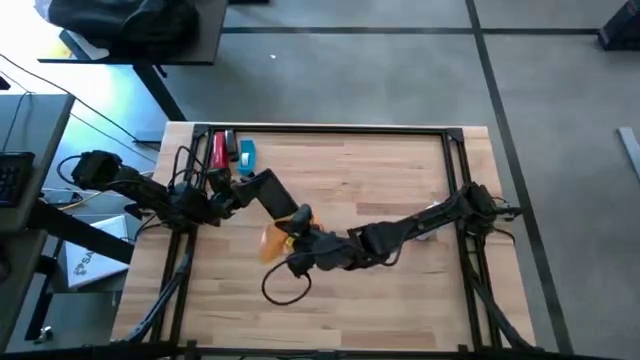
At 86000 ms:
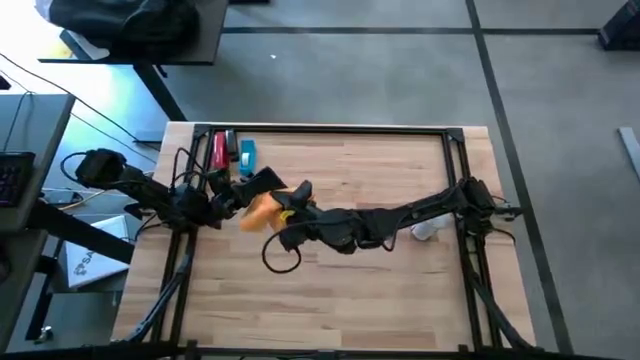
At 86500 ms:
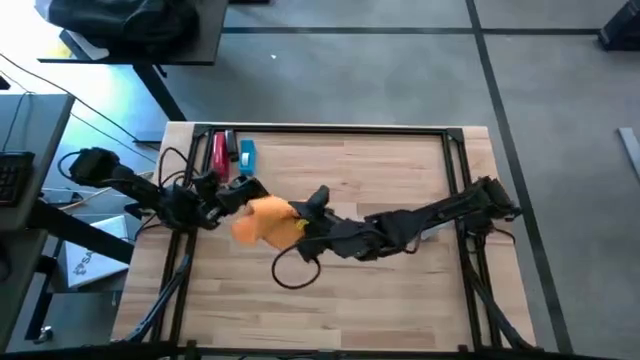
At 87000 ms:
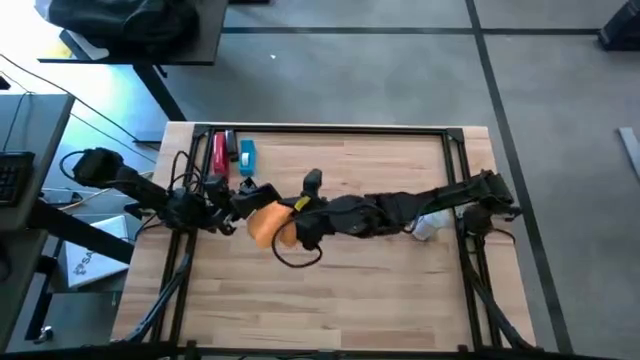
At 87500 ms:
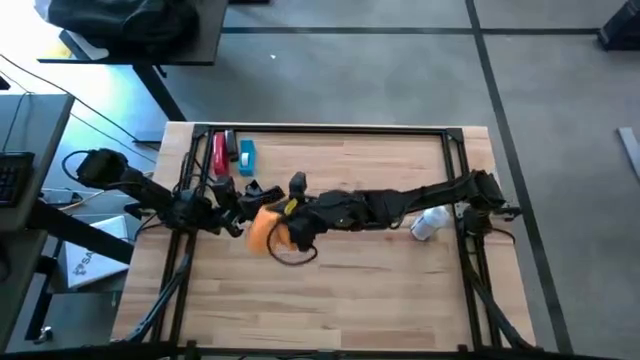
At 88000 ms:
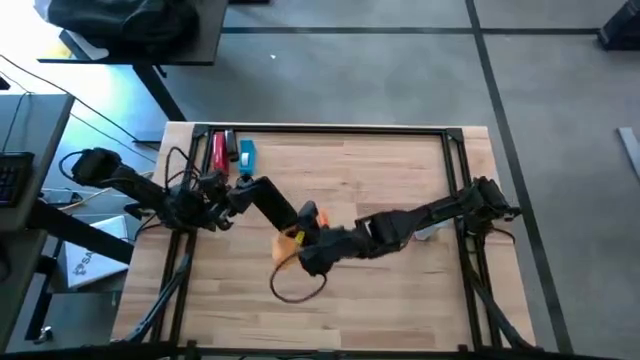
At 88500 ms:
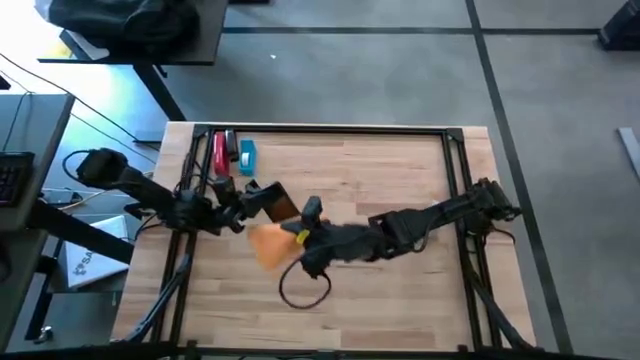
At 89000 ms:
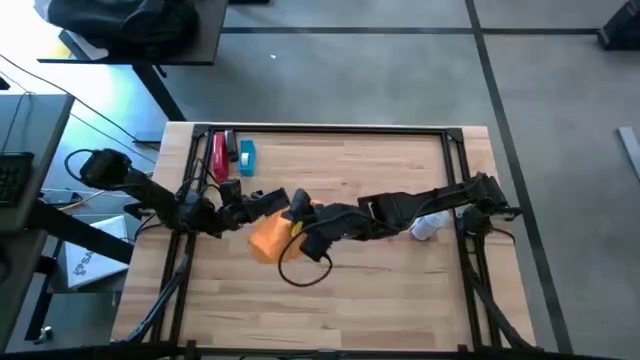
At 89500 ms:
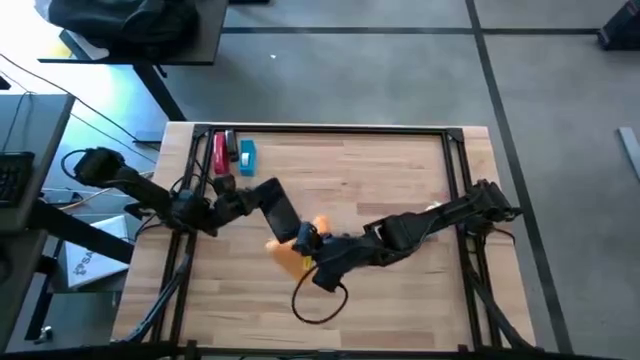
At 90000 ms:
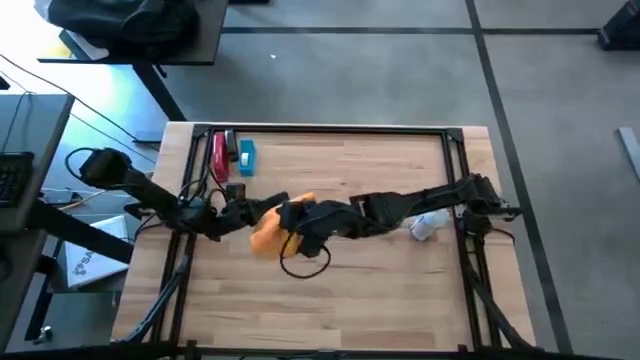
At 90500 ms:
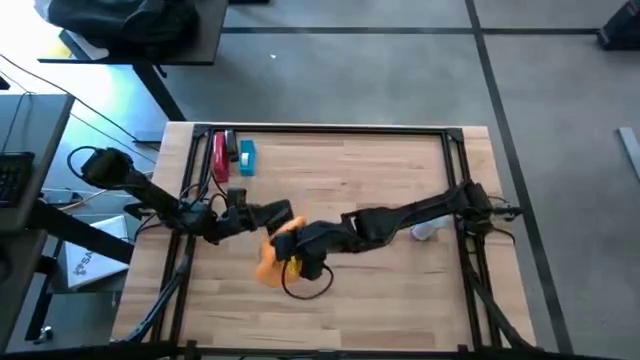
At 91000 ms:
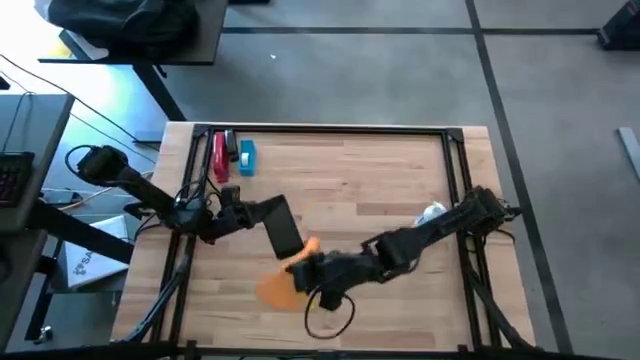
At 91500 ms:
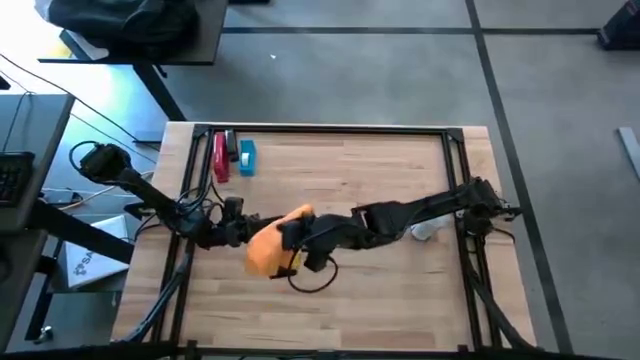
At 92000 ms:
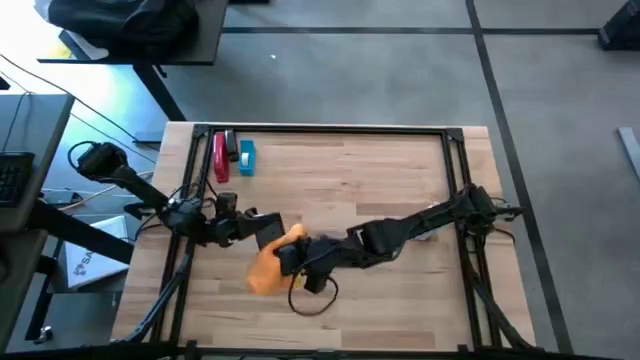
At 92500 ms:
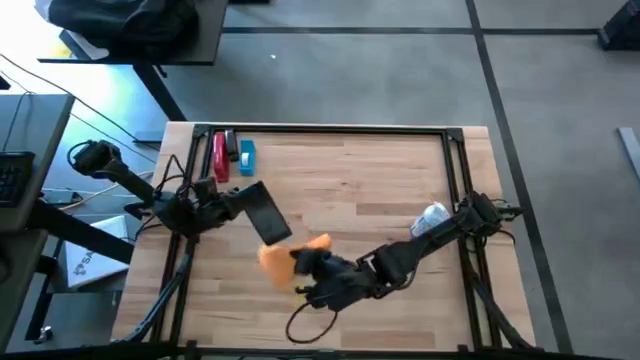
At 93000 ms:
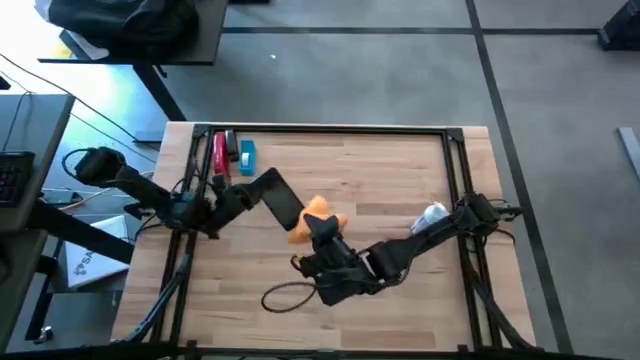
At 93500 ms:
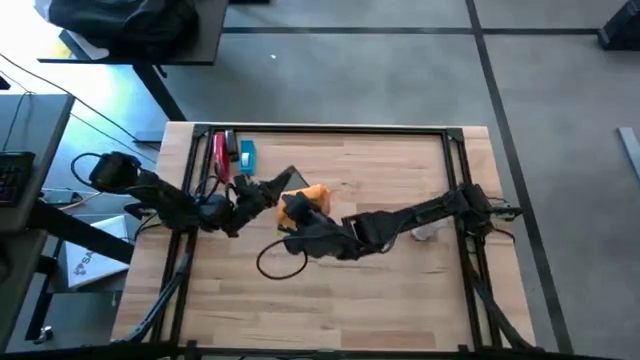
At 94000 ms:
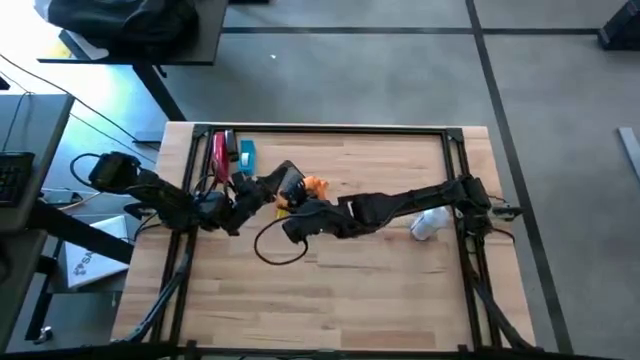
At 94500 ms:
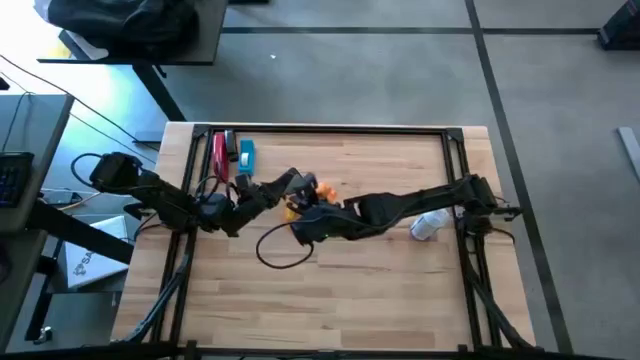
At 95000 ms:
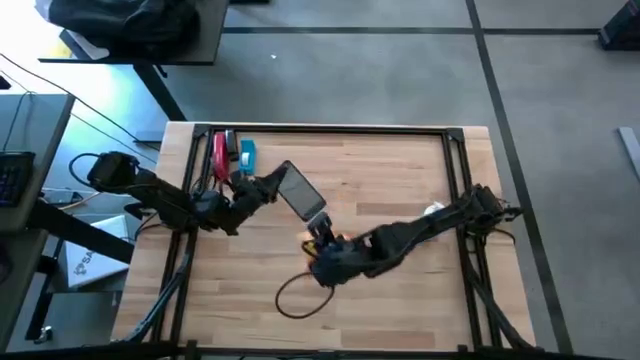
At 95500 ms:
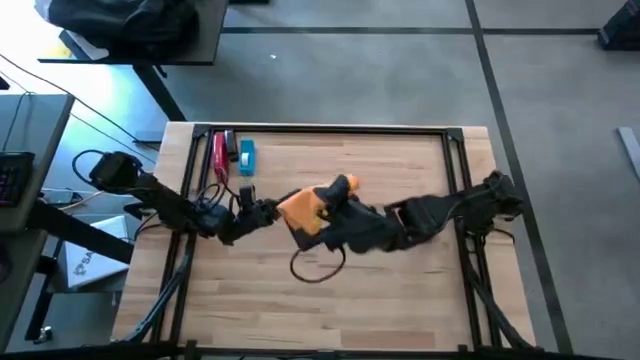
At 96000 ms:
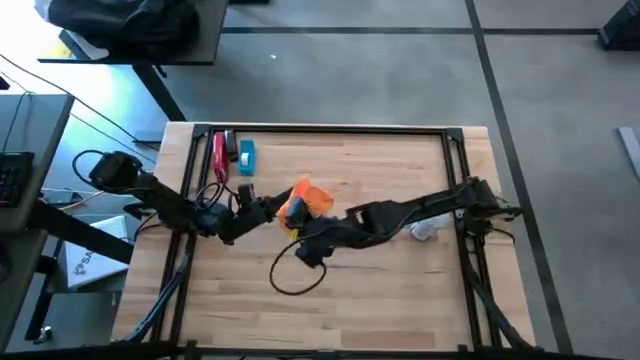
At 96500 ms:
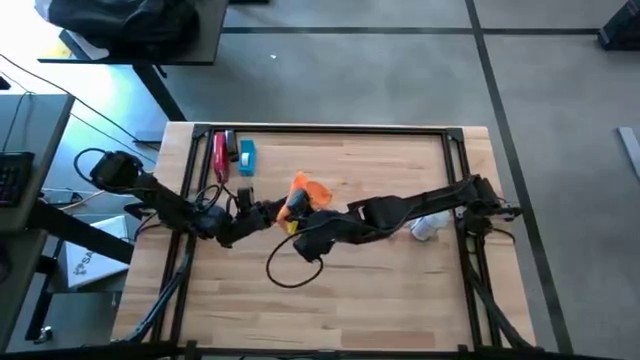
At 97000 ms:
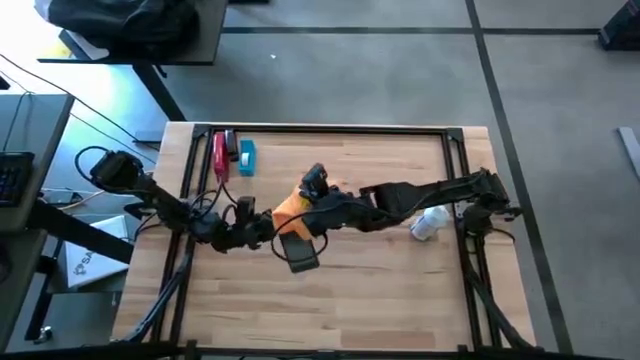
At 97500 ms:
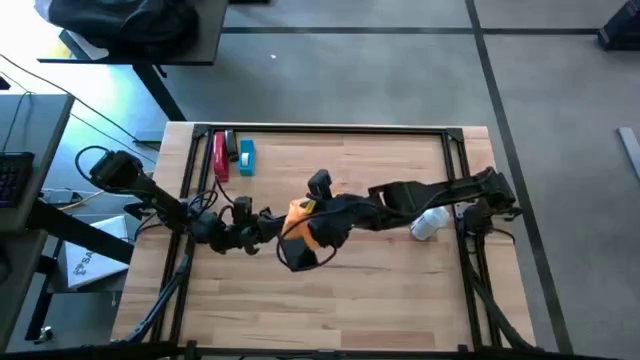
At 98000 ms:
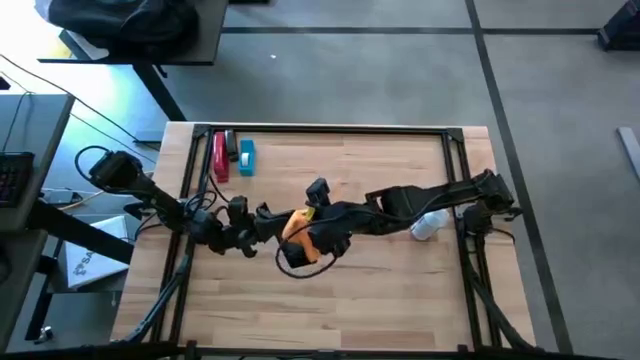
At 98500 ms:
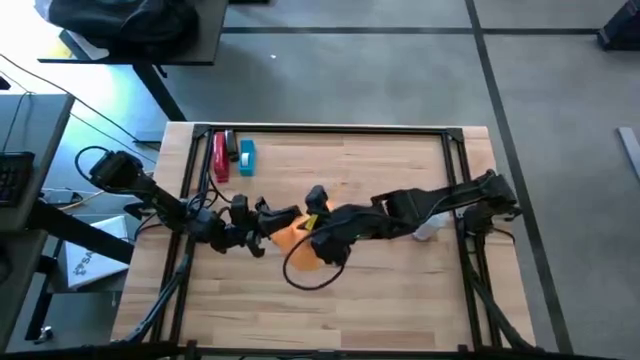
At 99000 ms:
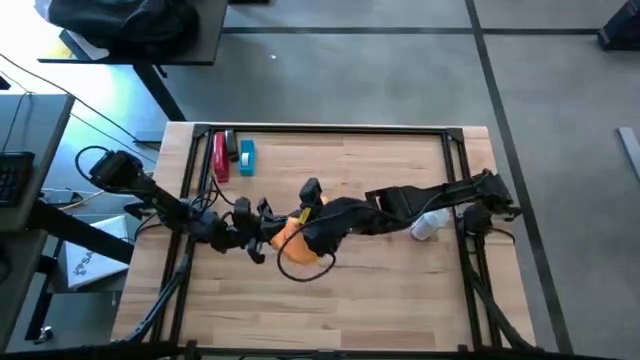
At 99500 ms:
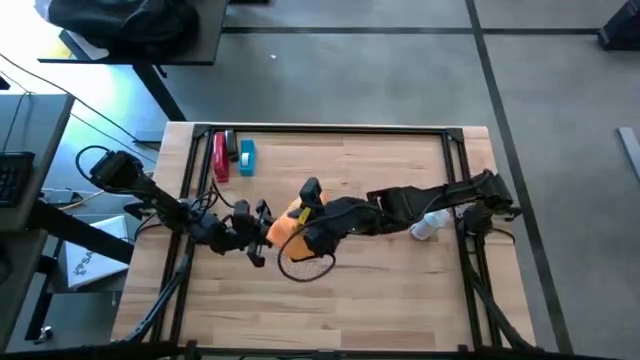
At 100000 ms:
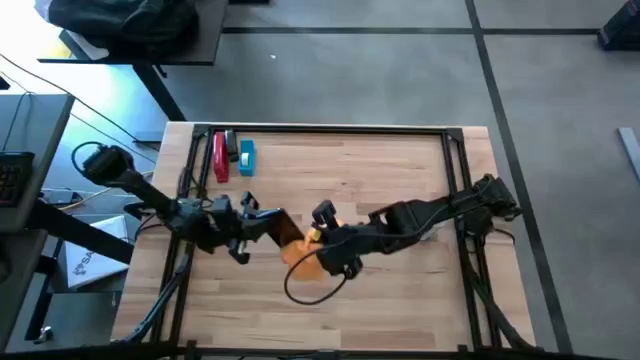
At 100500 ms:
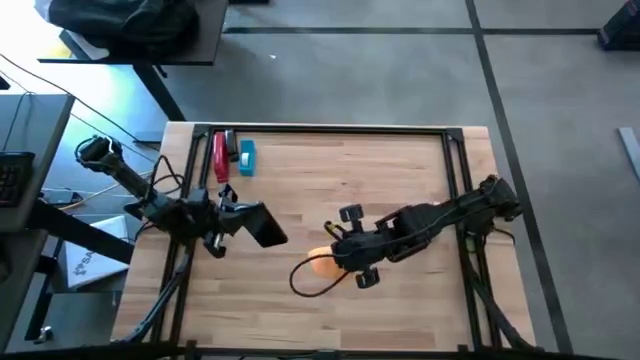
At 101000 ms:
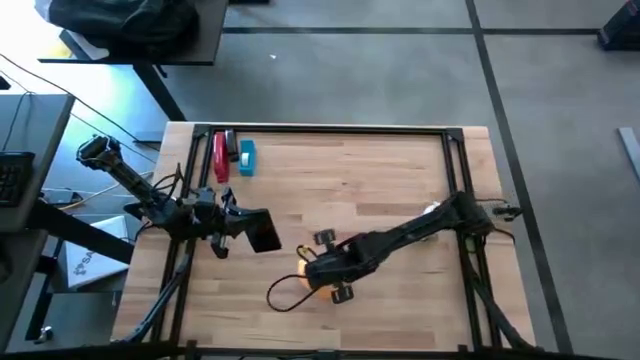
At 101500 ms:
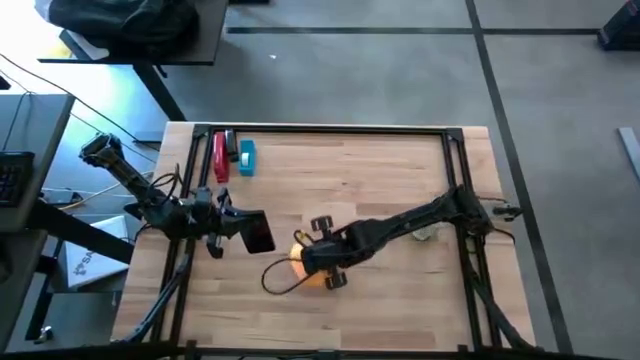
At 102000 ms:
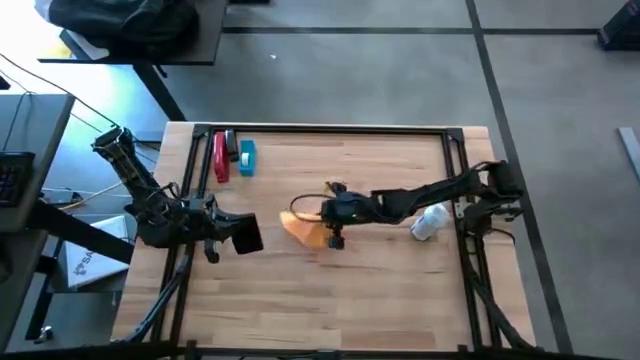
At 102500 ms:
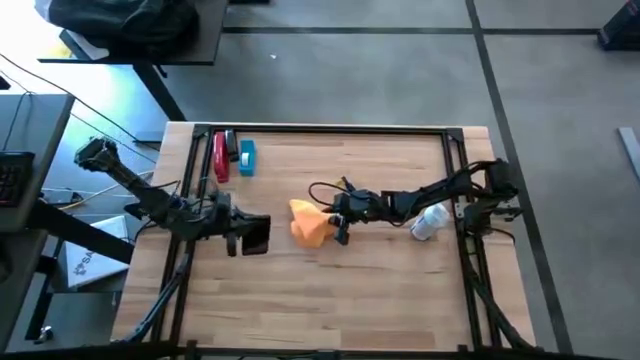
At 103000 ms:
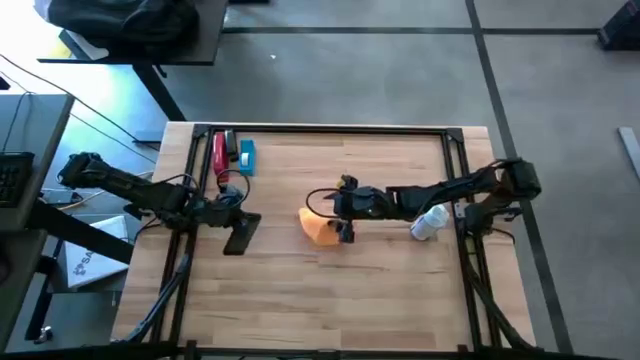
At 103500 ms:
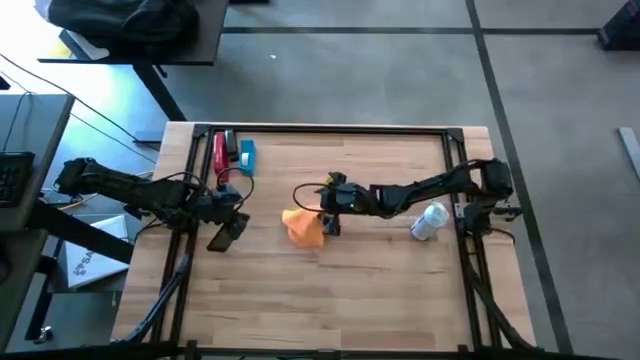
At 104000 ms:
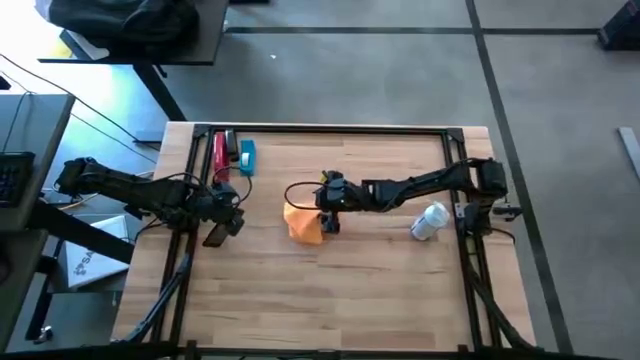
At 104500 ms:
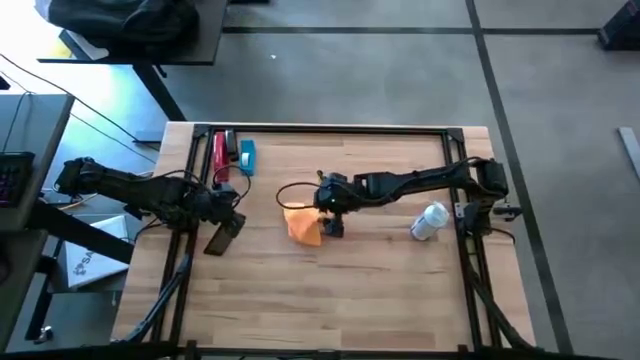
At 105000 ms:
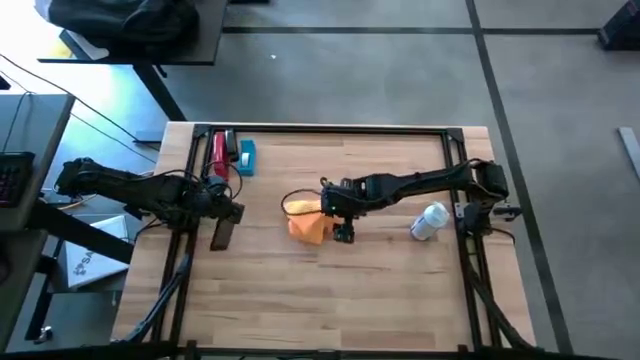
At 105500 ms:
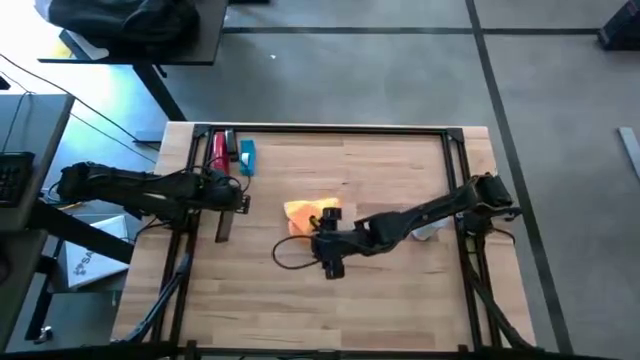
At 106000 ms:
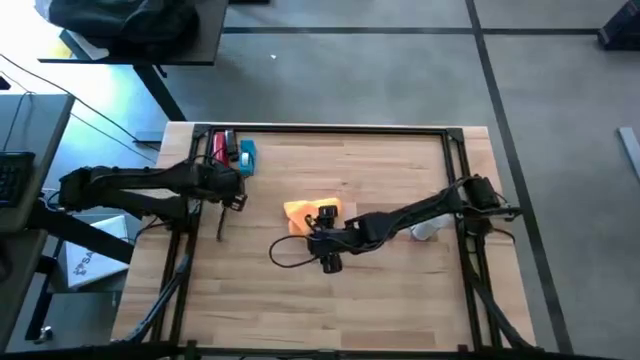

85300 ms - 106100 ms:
Task: Apply microfiber cloth
Wipe the front and back of the black cellphone using the yellow microfiber cloth
